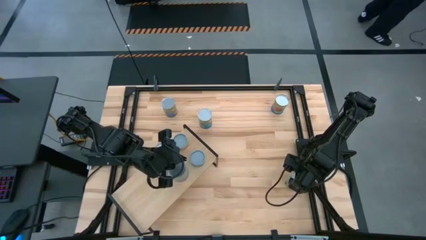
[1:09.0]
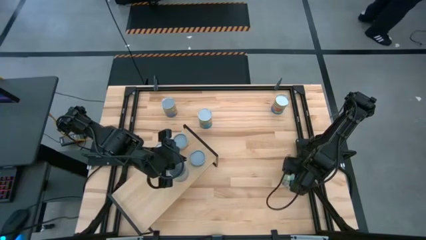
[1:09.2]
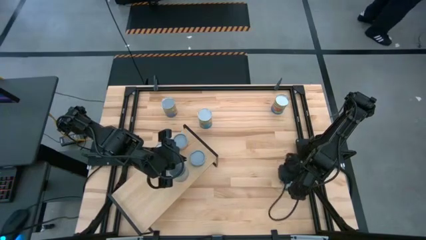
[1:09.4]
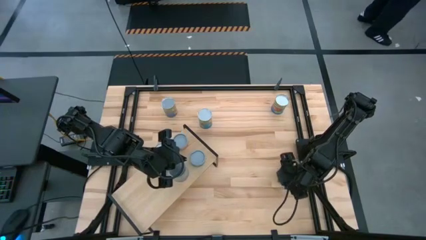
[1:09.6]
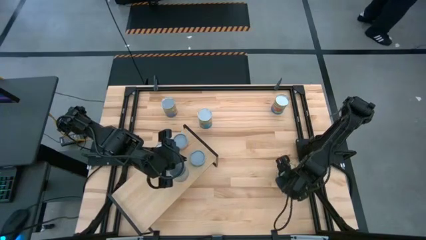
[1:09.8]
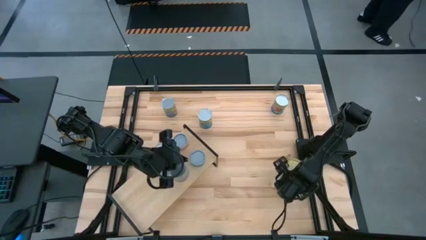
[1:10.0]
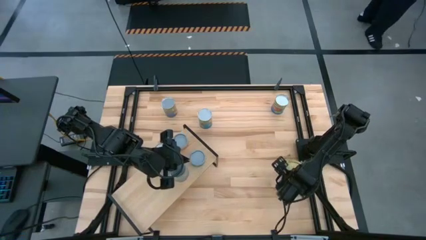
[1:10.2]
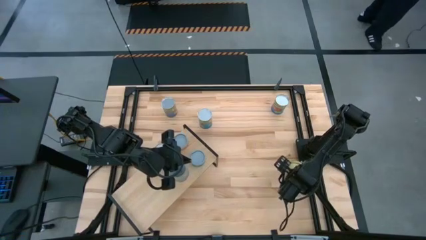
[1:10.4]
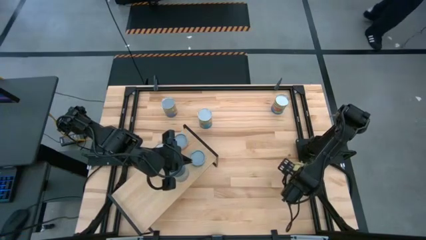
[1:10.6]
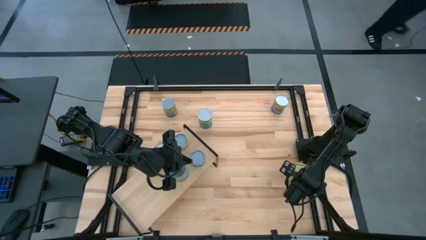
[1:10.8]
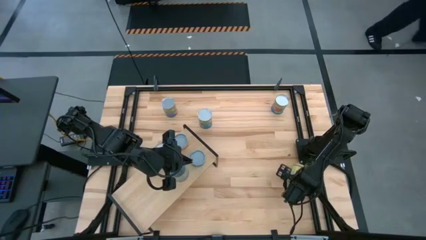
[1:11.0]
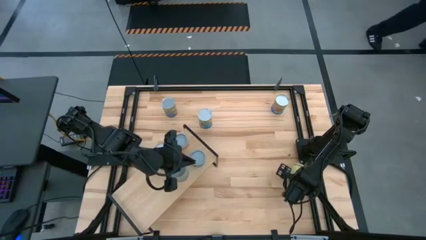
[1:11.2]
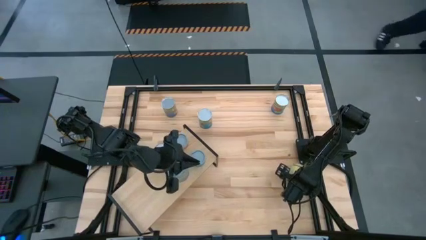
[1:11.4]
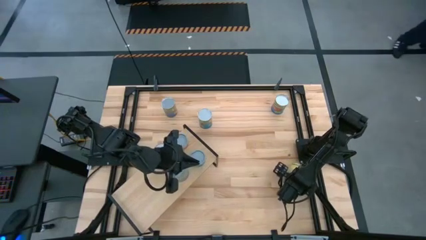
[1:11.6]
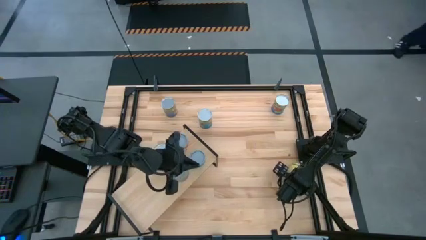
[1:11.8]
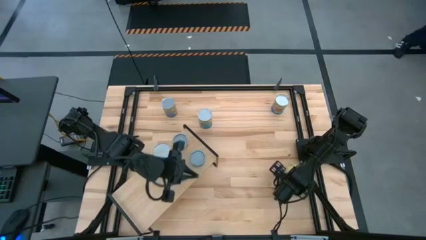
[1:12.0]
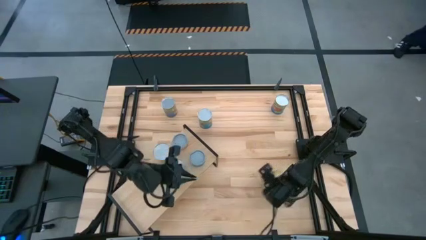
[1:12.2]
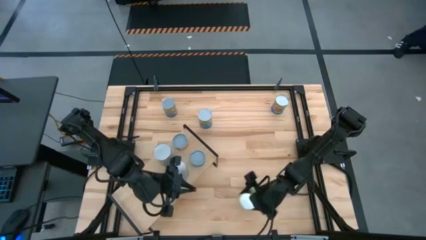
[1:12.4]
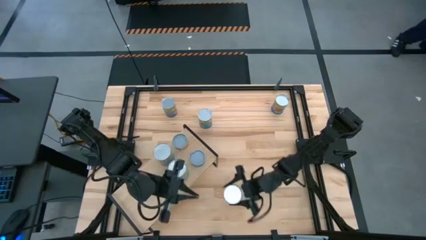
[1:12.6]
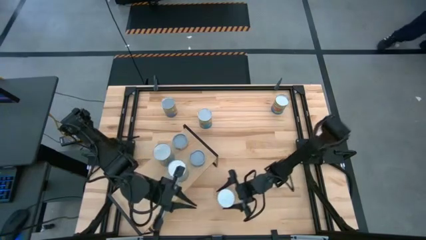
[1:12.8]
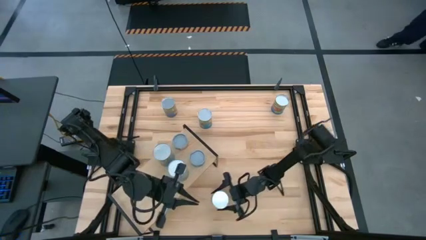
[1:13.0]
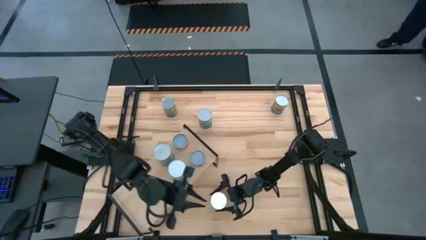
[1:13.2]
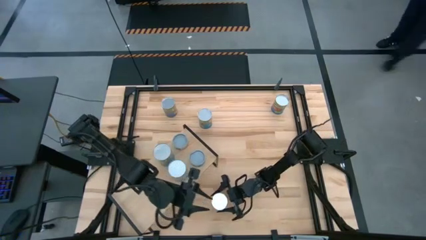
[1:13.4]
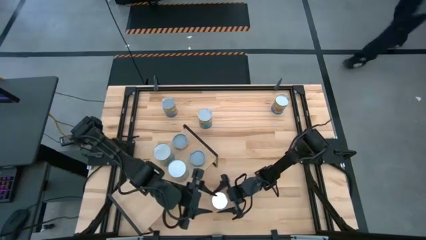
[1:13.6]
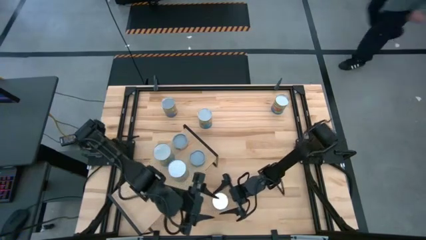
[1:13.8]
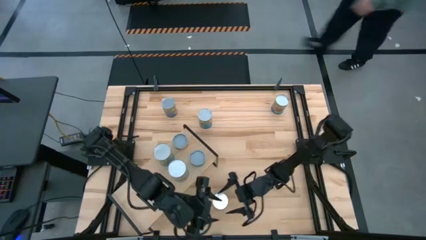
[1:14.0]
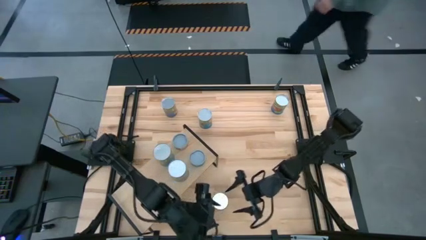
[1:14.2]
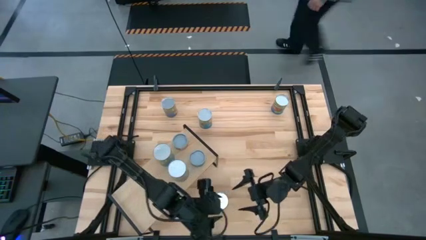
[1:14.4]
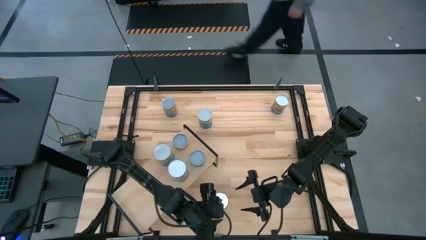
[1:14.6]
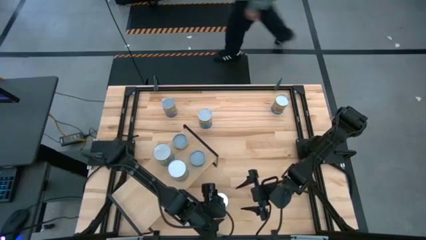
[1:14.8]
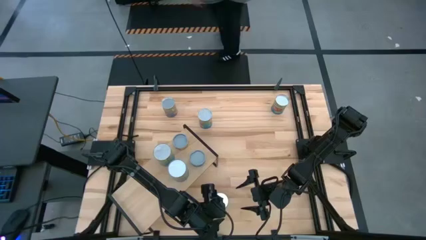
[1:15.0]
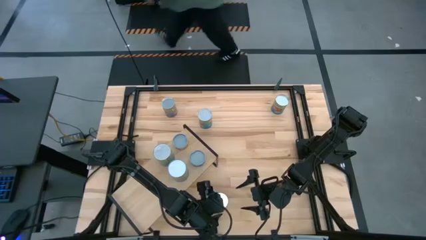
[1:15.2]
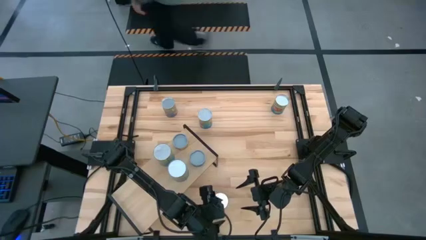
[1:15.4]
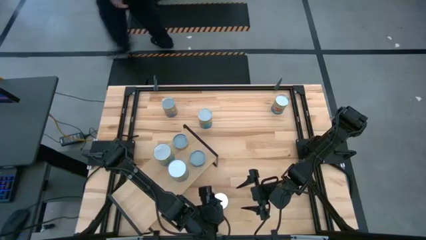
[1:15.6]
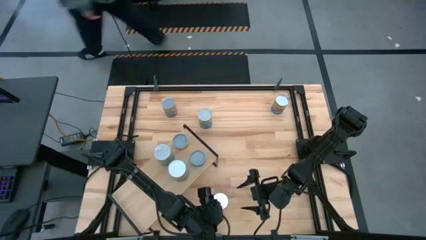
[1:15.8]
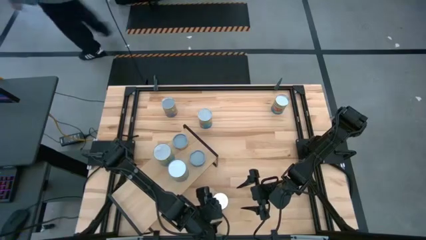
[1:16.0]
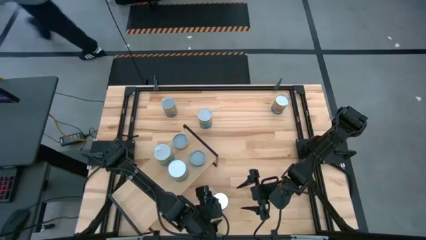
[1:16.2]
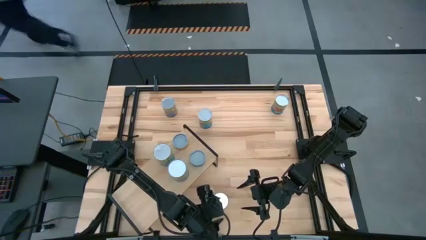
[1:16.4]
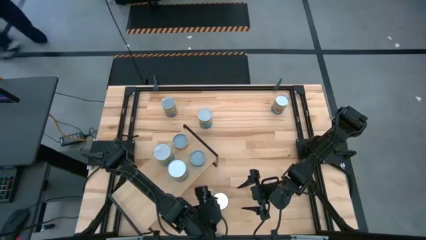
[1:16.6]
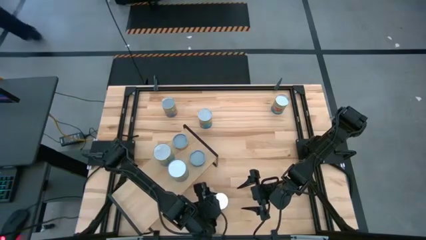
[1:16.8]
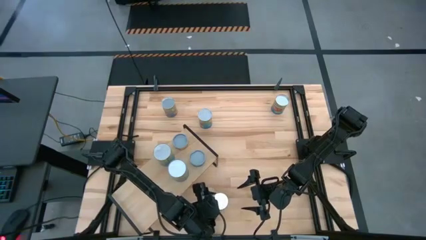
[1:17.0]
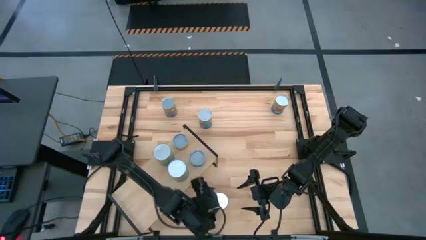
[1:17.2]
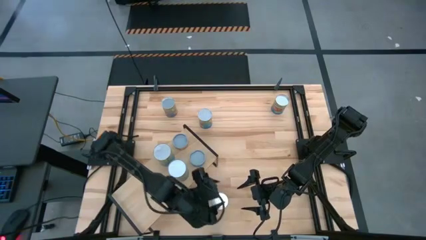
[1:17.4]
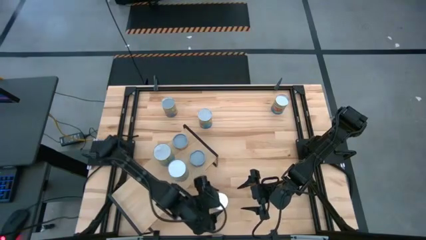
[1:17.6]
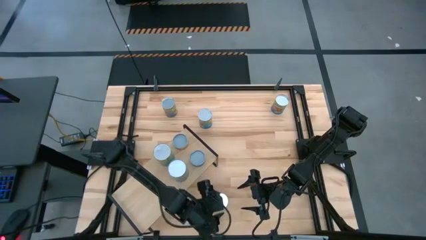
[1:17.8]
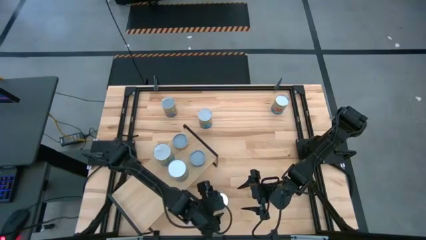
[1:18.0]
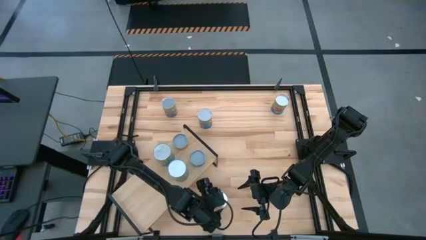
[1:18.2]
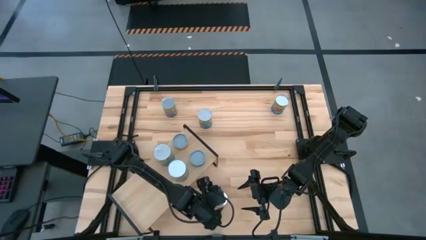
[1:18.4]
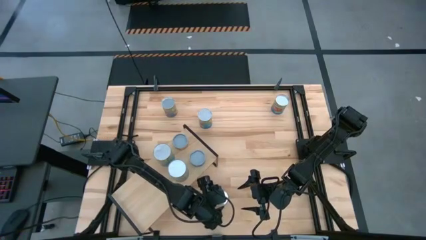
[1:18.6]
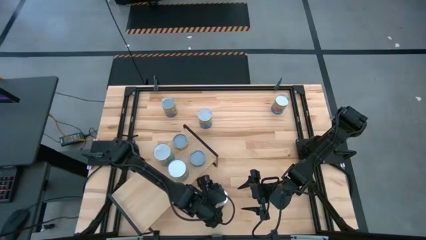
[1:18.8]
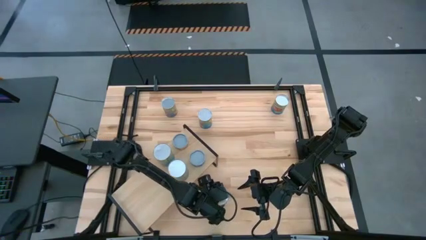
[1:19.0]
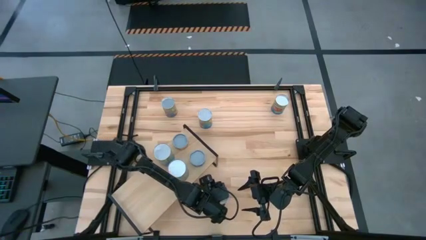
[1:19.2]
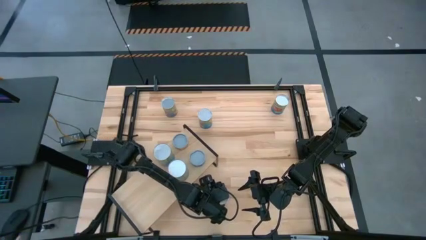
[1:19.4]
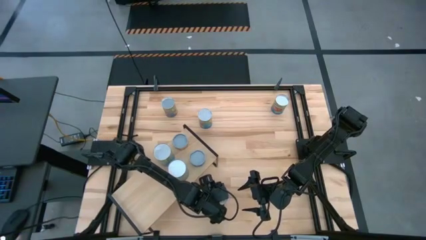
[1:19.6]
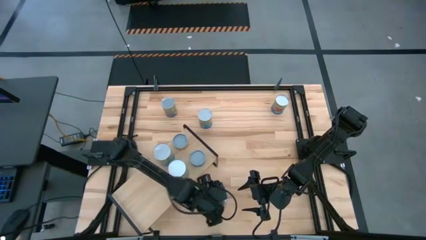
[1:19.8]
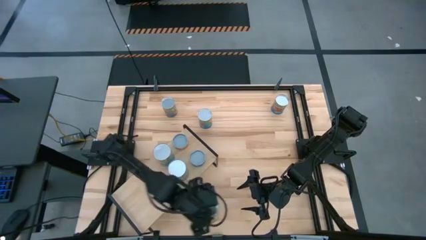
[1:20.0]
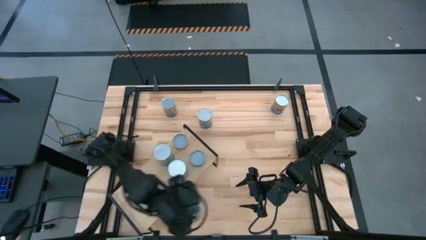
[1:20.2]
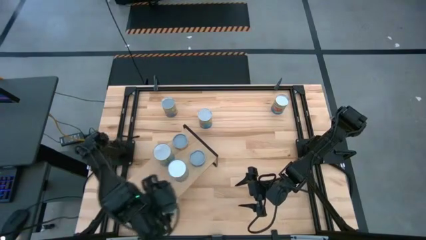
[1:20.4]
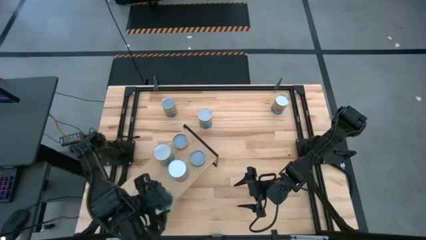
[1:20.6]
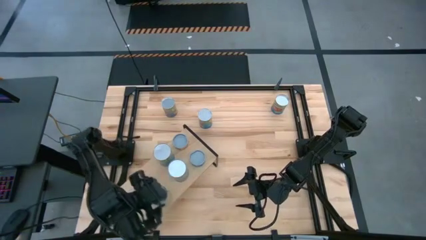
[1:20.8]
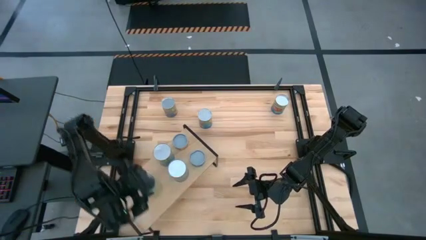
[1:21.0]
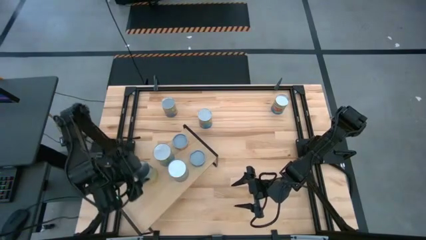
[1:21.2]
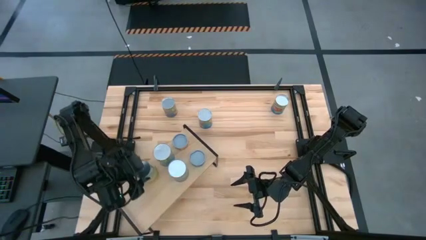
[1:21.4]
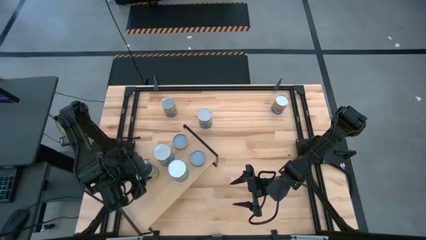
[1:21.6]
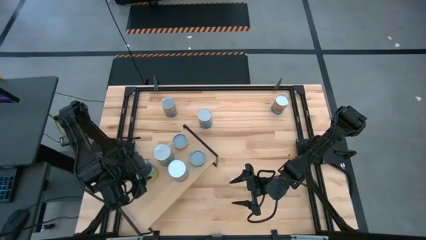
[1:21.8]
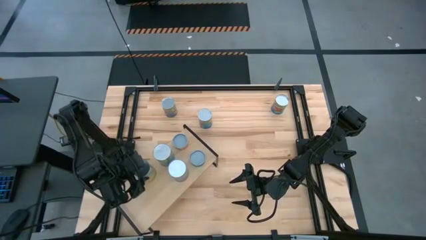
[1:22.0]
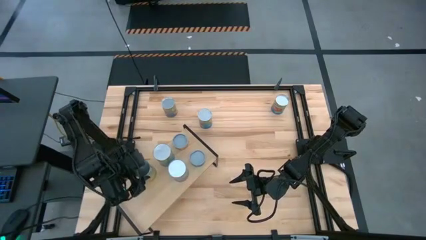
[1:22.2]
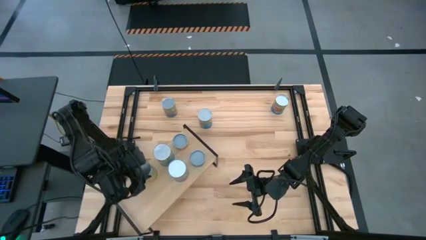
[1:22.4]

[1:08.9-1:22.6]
Task: Pick and place cans onto a shelf
Put the canned carrots on the shelf
